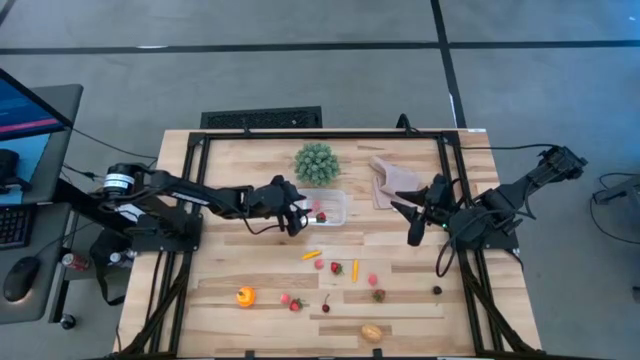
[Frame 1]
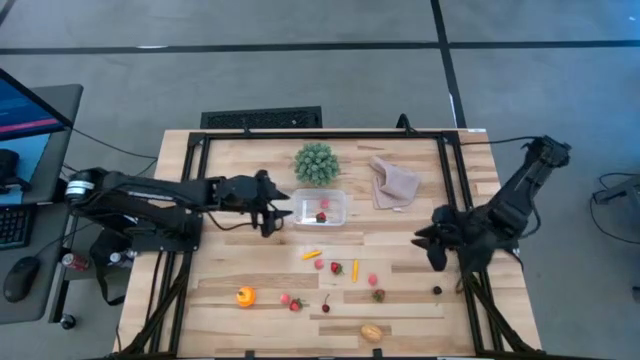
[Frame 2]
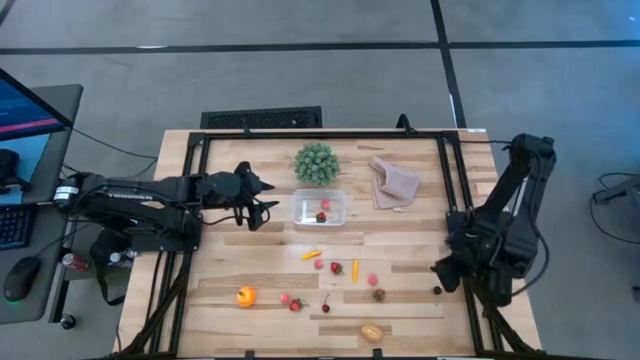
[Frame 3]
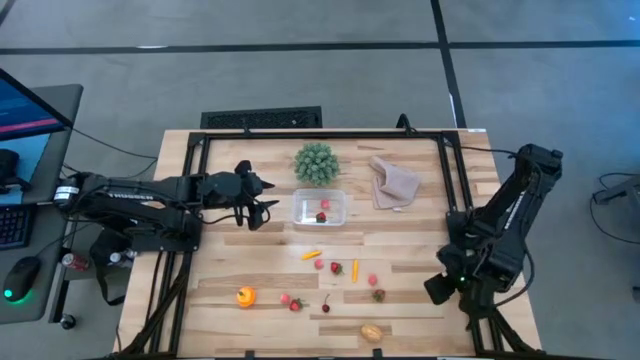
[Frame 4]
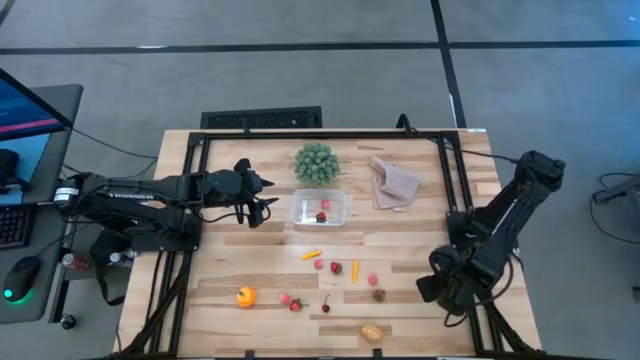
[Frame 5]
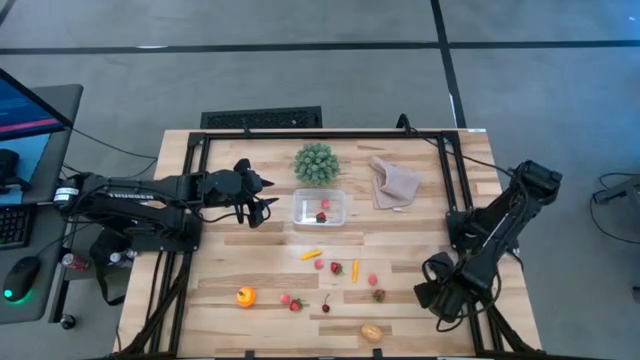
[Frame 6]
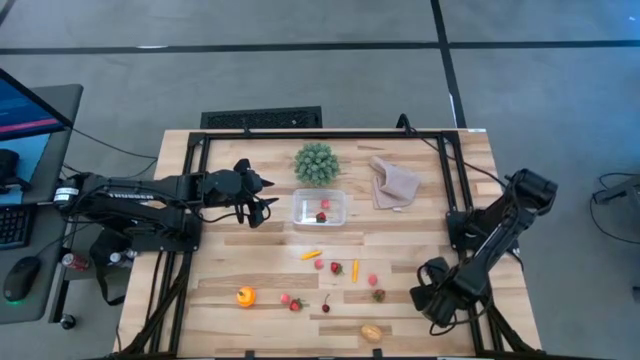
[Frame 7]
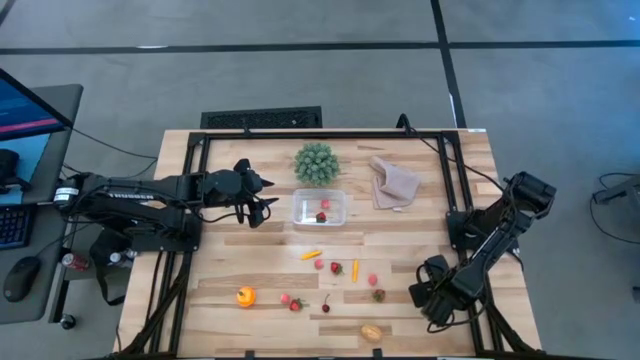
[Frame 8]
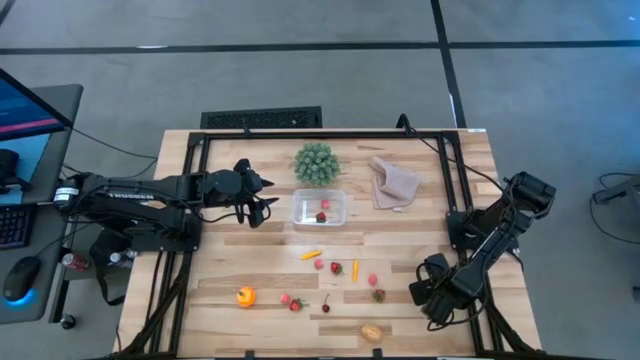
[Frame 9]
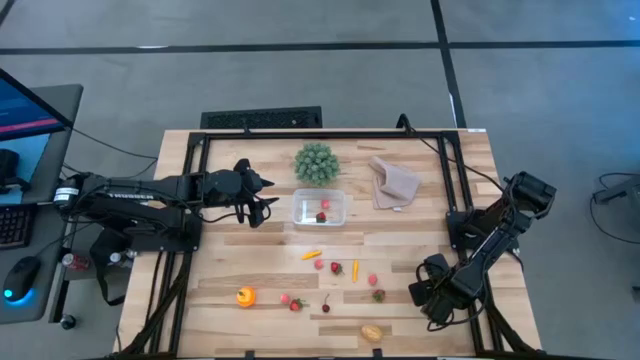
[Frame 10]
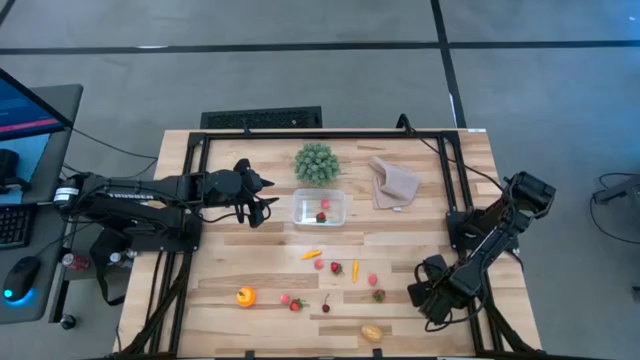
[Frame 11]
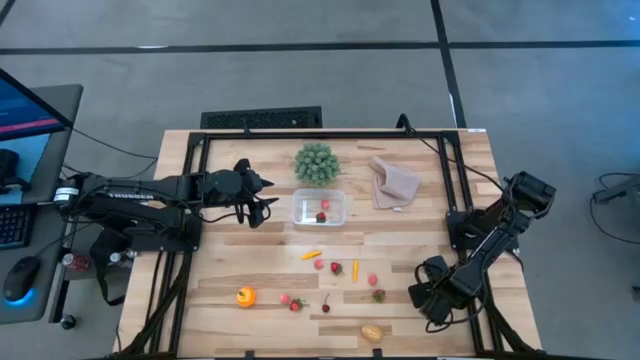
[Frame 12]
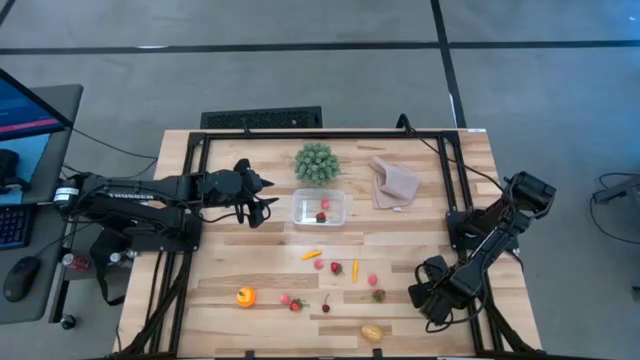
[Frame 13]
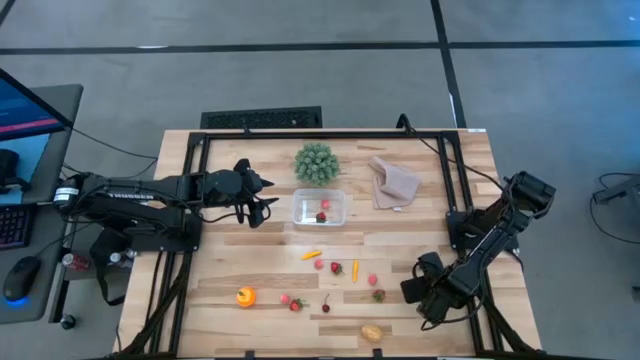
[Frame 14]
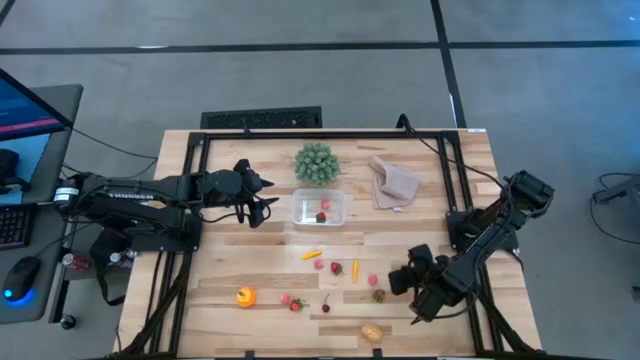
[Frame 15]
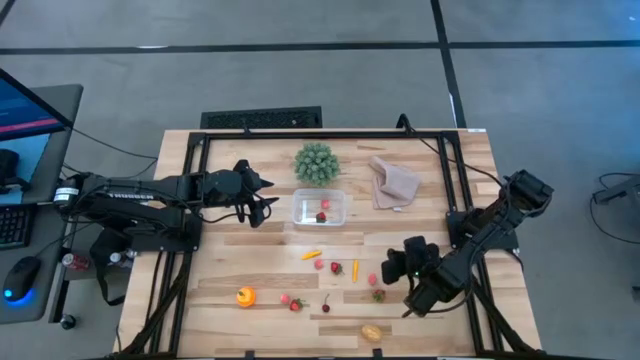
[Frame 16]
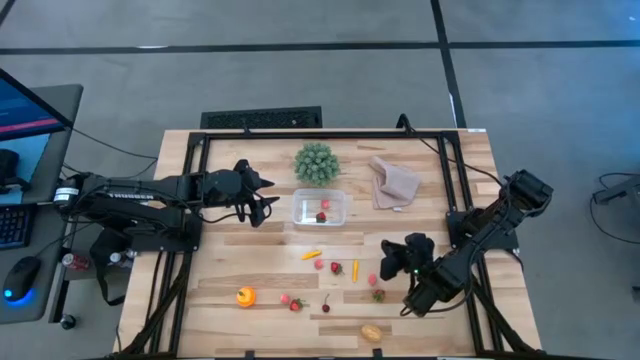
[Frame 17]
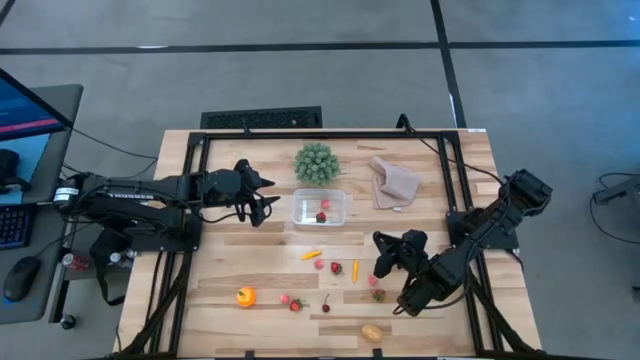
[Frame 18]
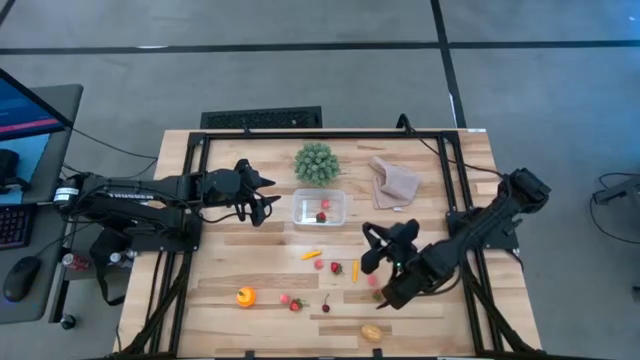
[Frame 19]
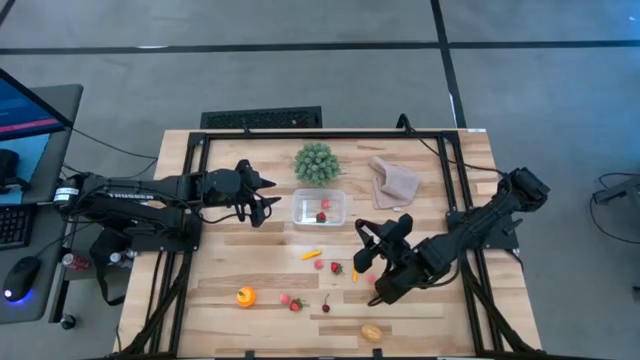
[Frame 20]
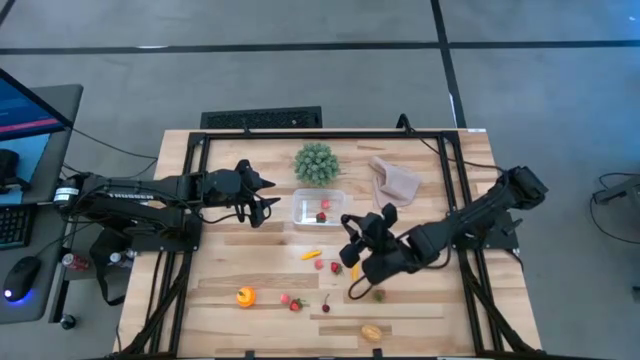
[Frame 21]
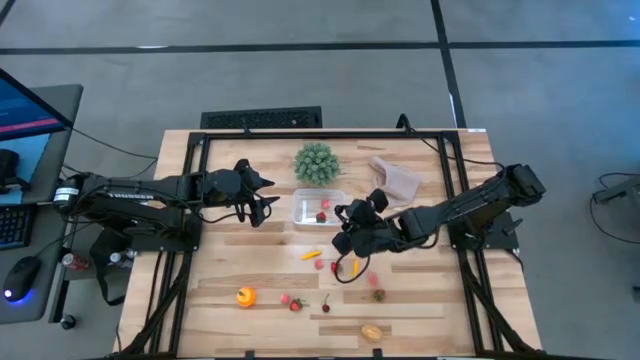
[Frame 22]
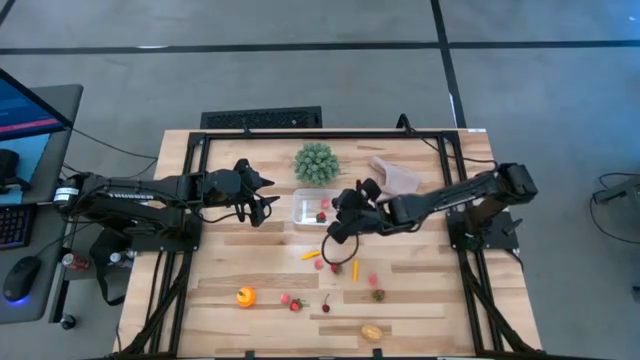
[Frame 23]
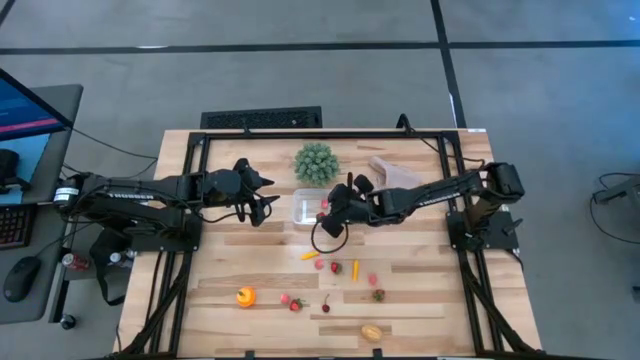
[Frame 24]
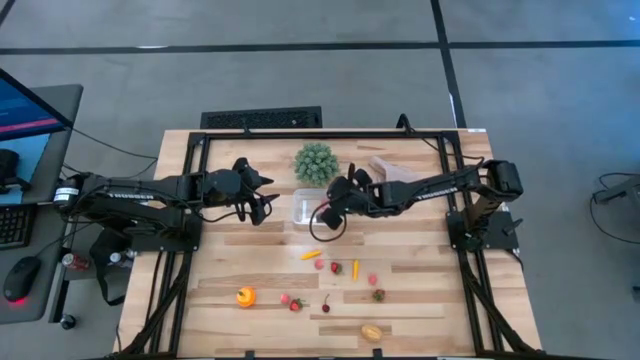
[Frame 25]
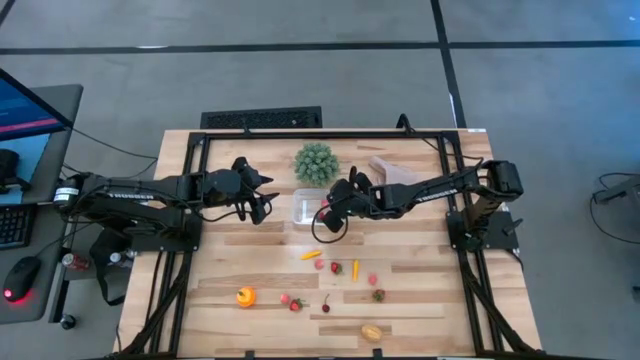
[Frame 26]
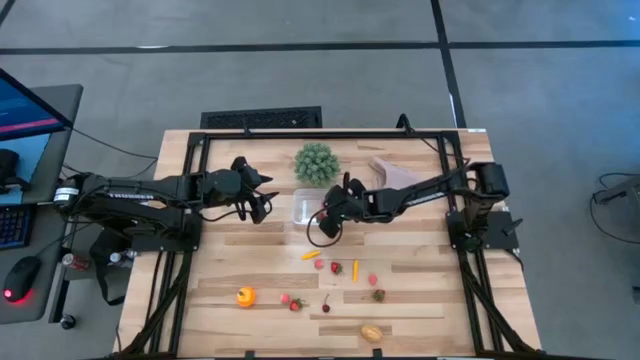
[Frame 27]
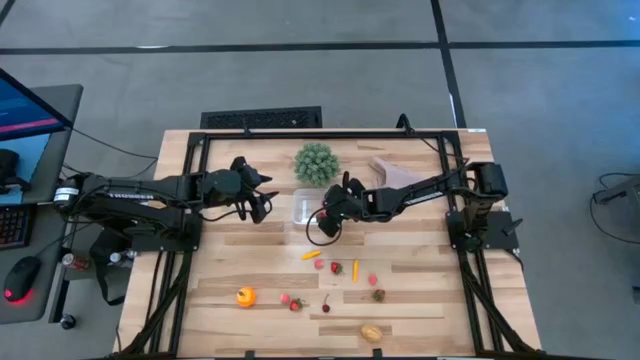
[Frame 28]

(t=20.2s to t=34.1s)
Task: Pick and placing Produce into tupperware
Put the black cherry into the transparent container

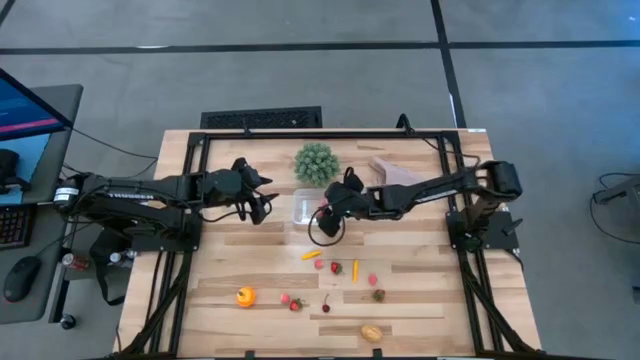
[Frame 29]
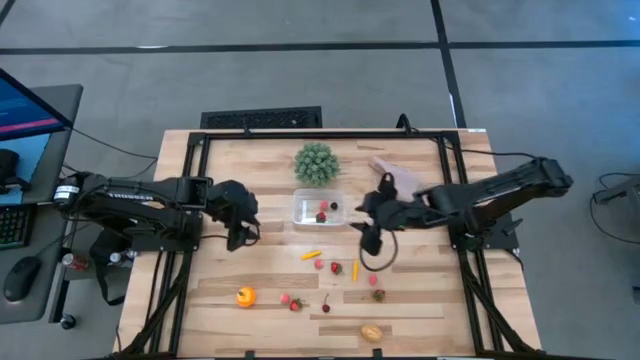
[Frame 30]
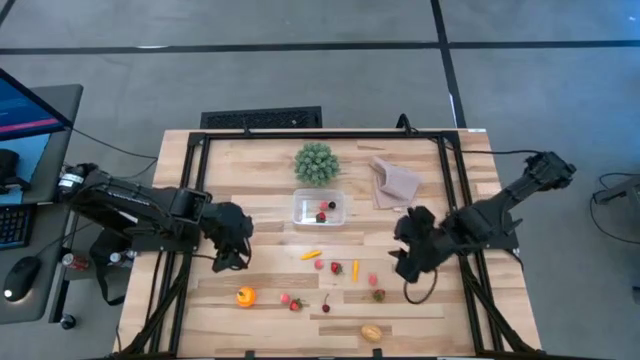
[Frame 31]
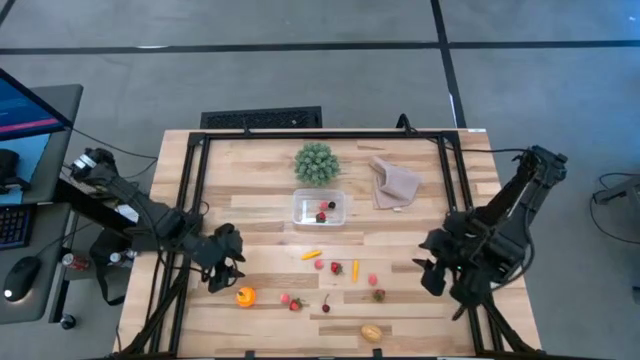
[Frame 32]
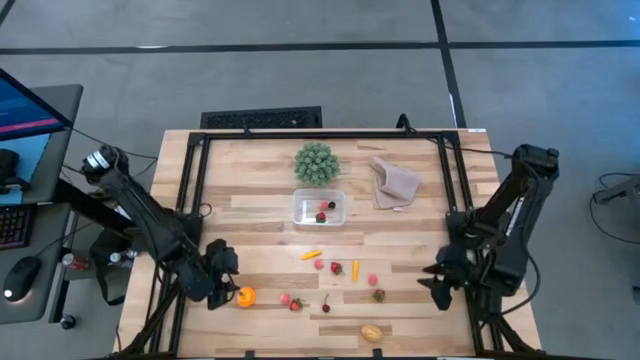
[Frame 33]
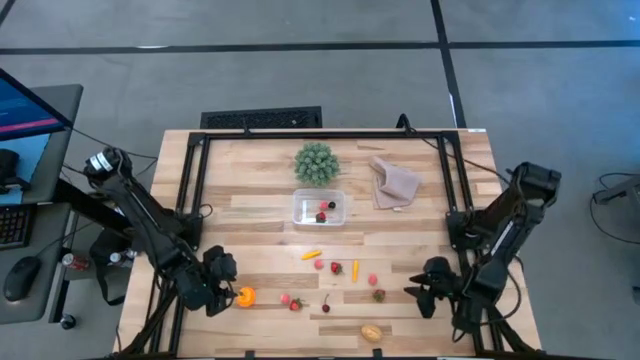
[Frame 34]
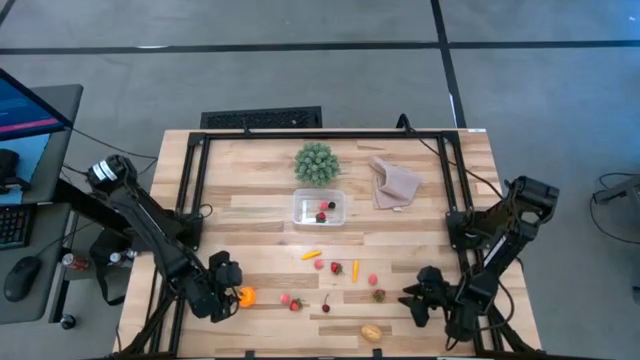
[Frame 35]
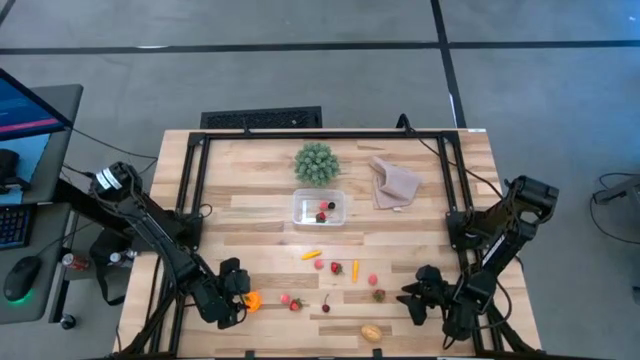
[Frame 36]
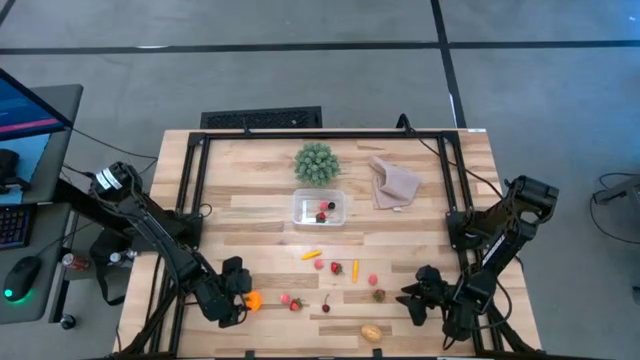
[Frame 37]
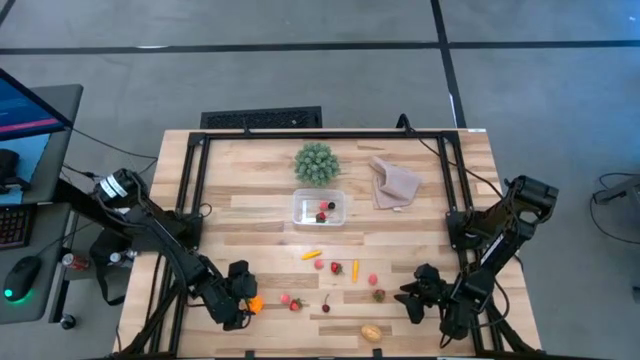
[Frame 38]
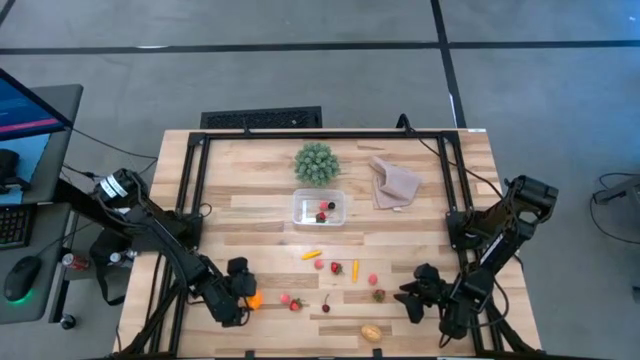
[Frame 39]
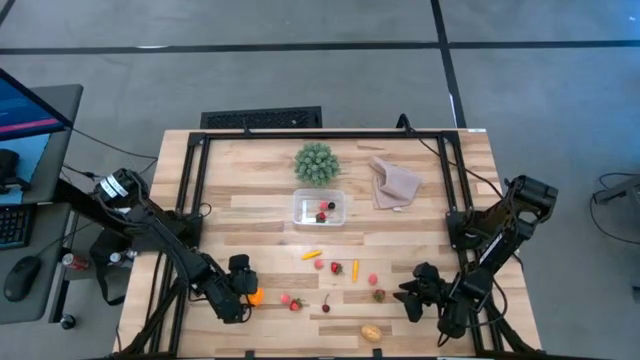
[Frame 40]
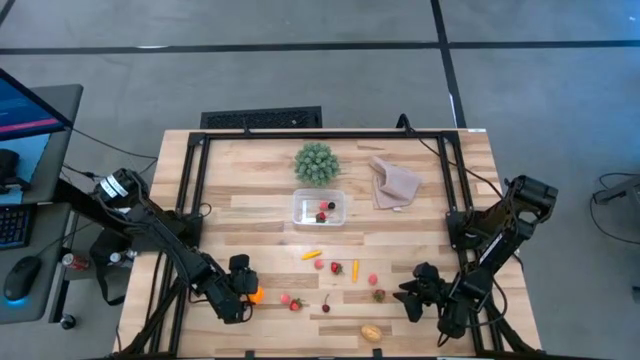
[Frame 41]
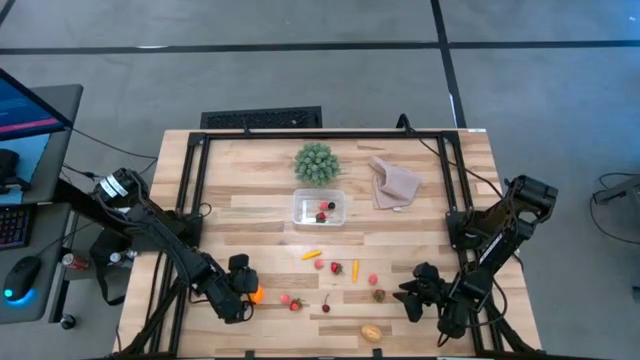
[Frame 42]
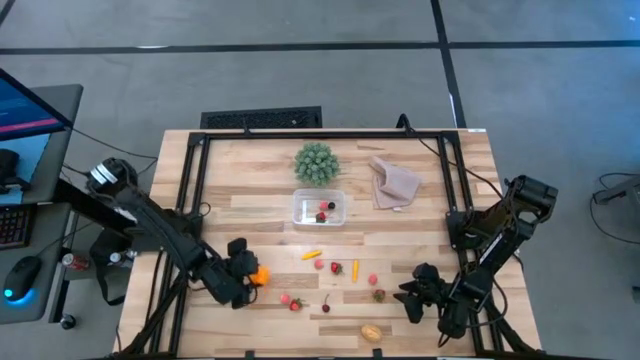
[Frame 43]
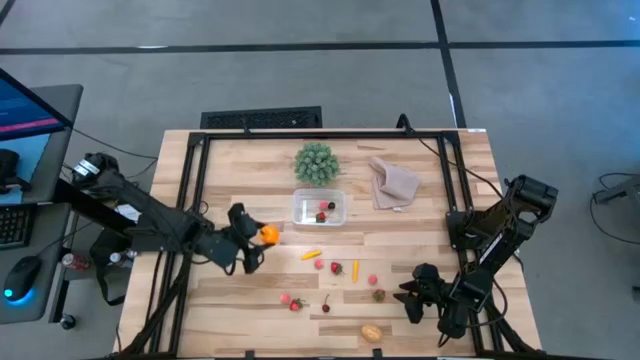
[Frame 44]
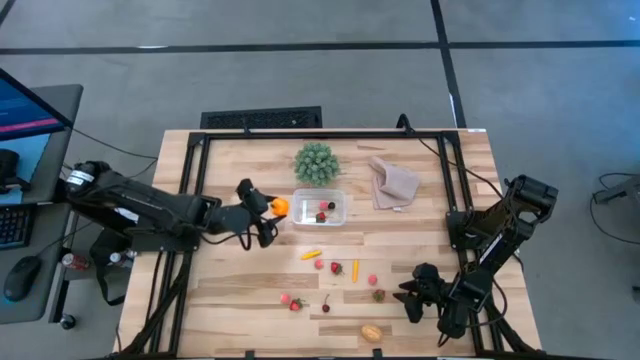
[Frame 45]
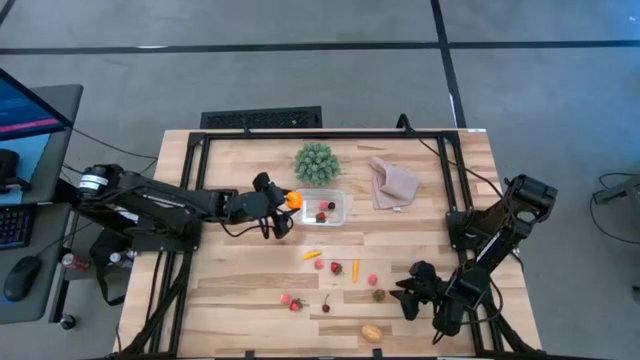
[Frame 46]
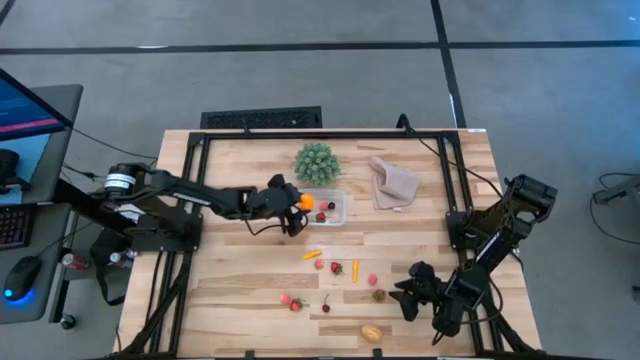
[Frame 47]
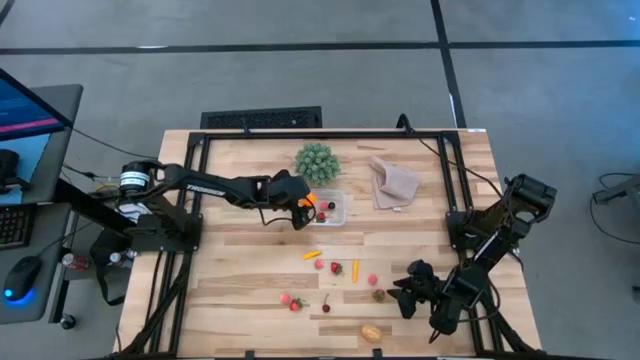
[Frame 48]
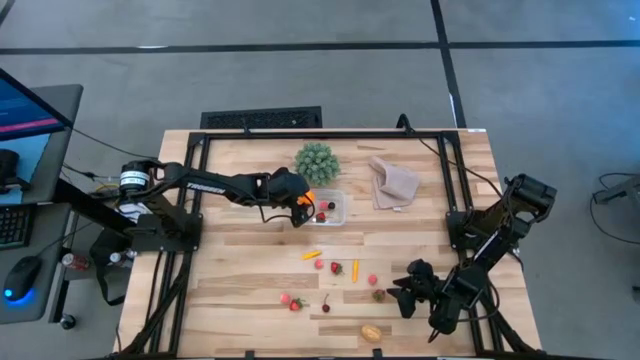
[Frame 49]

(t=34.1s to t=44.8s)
Put the orange into the transparent container
